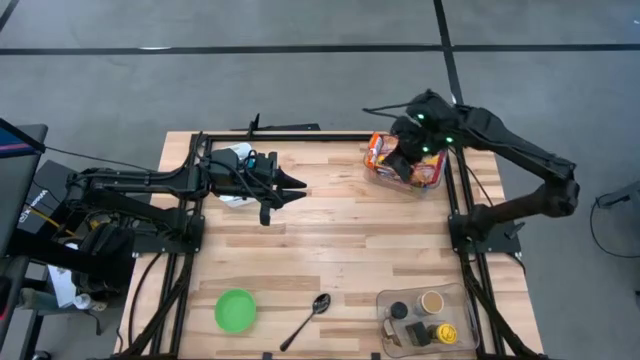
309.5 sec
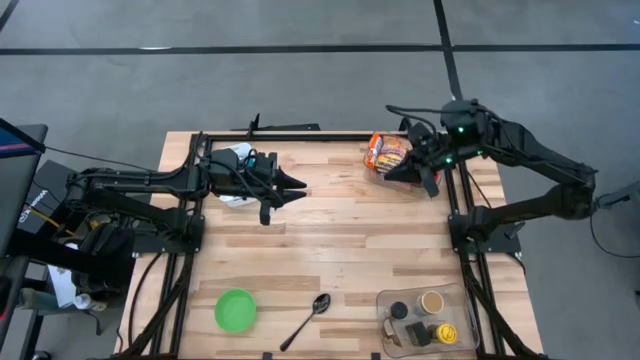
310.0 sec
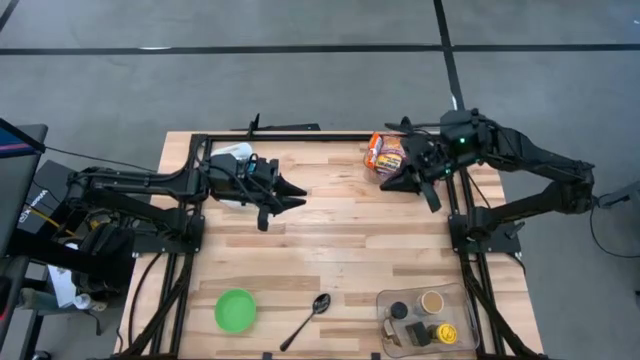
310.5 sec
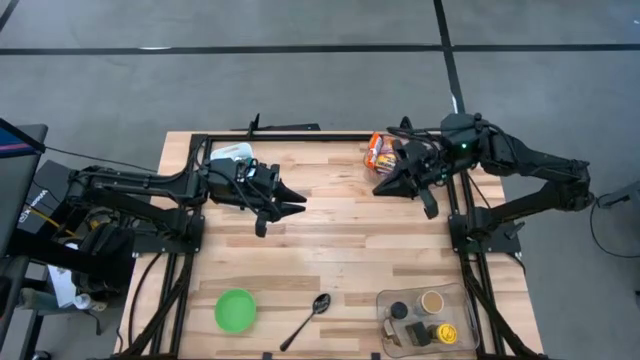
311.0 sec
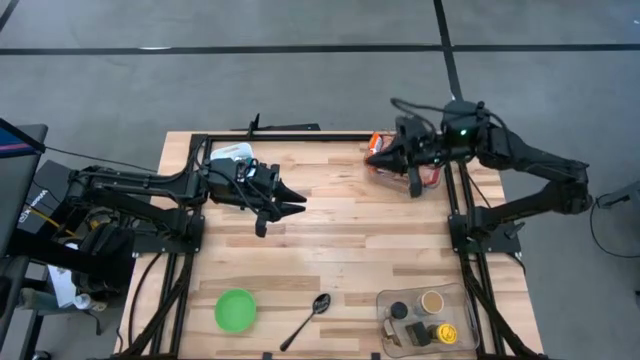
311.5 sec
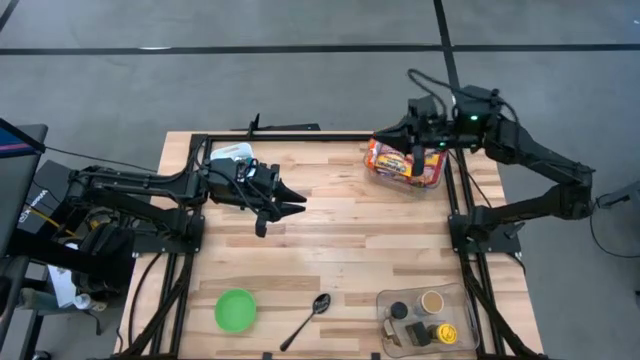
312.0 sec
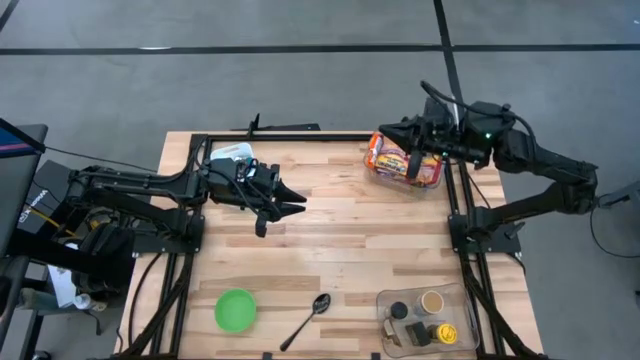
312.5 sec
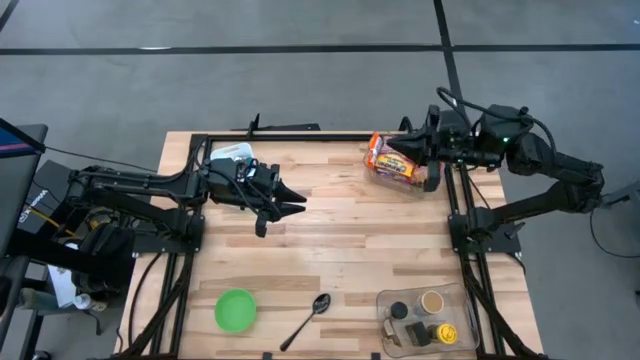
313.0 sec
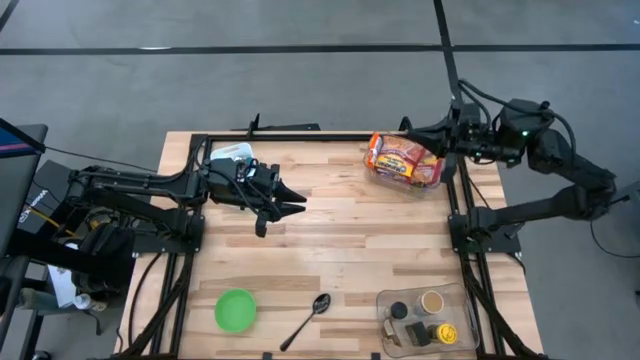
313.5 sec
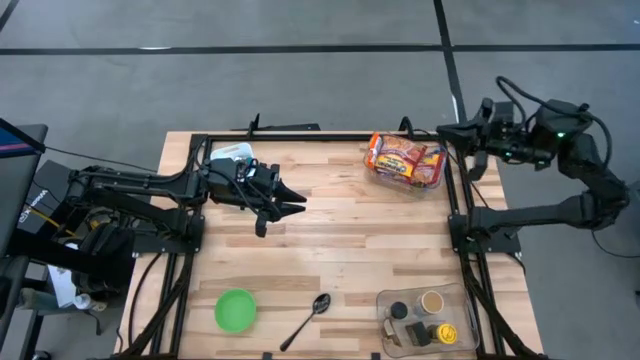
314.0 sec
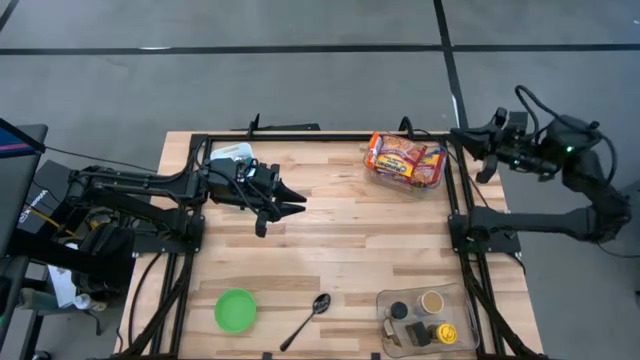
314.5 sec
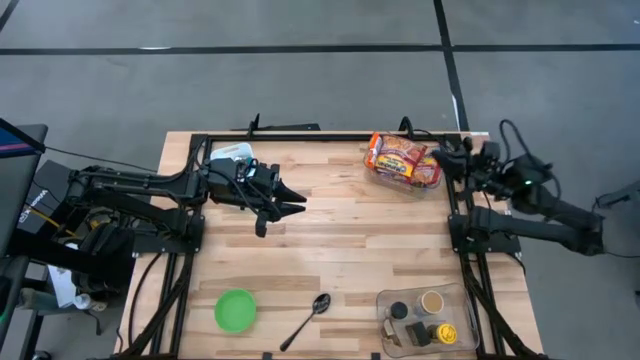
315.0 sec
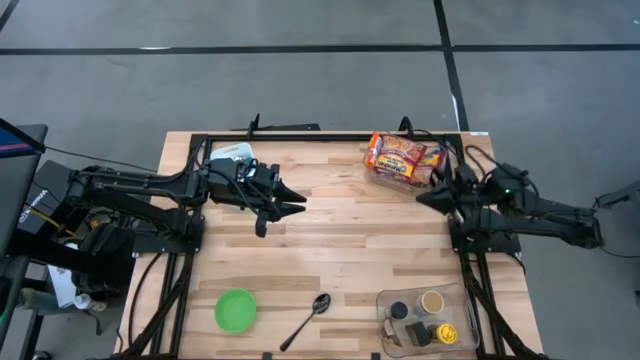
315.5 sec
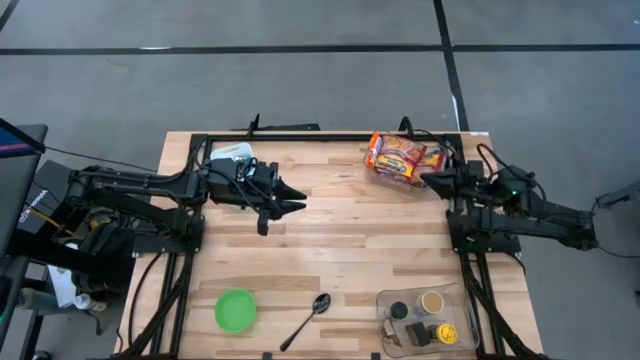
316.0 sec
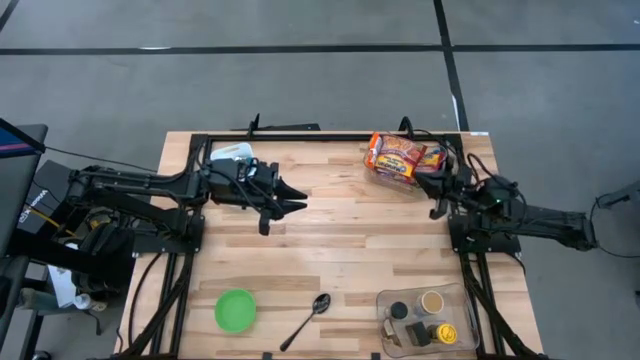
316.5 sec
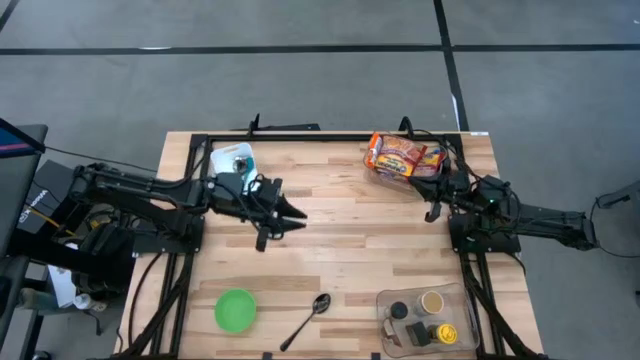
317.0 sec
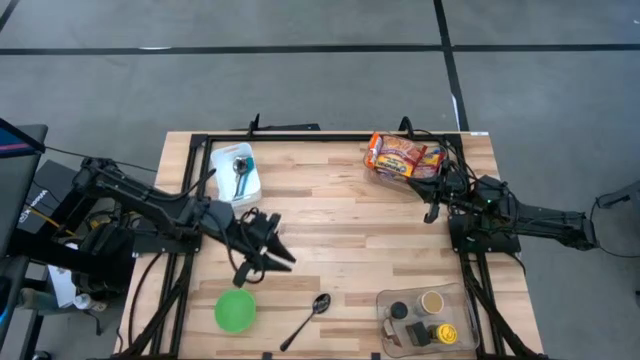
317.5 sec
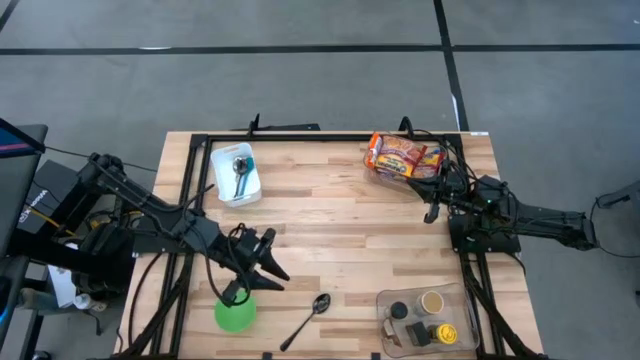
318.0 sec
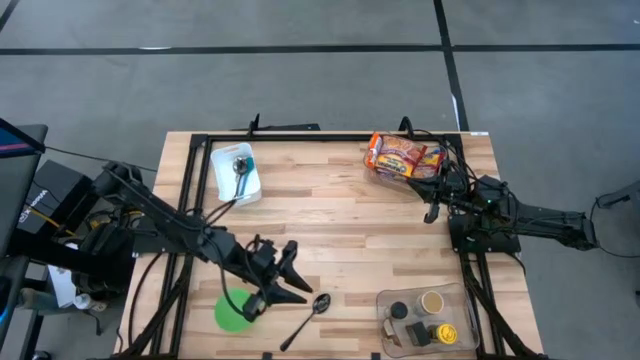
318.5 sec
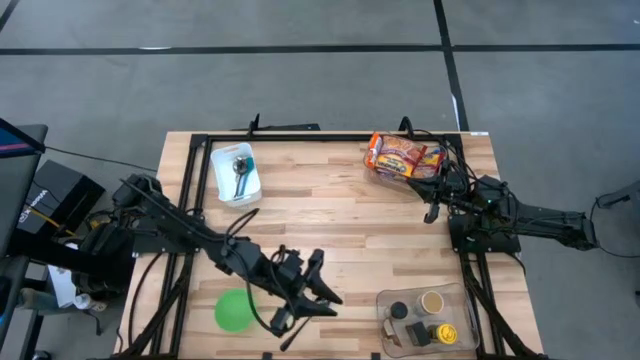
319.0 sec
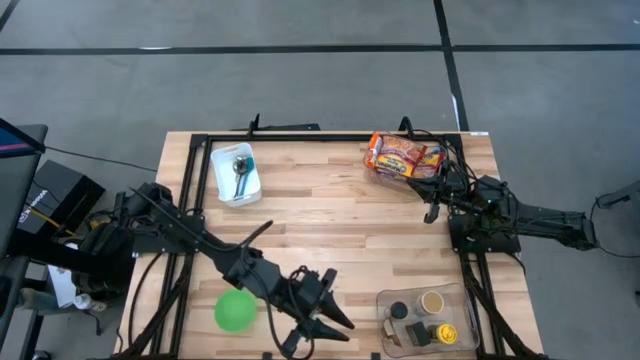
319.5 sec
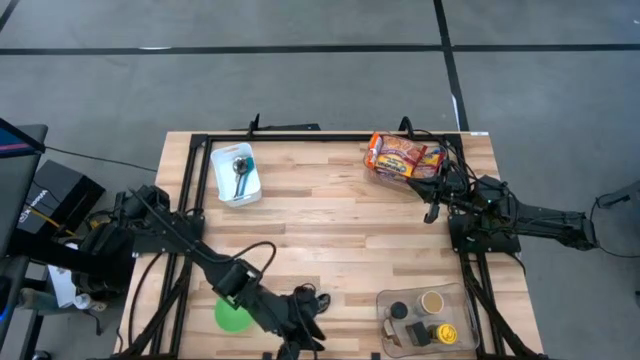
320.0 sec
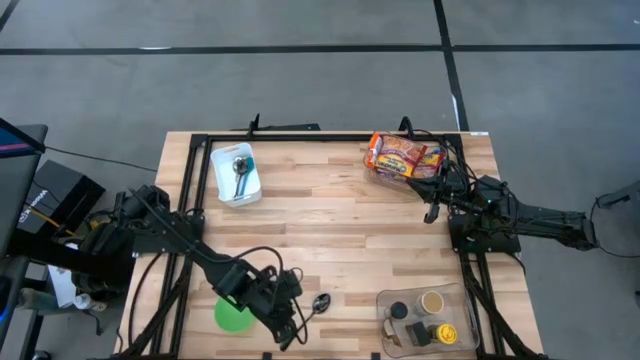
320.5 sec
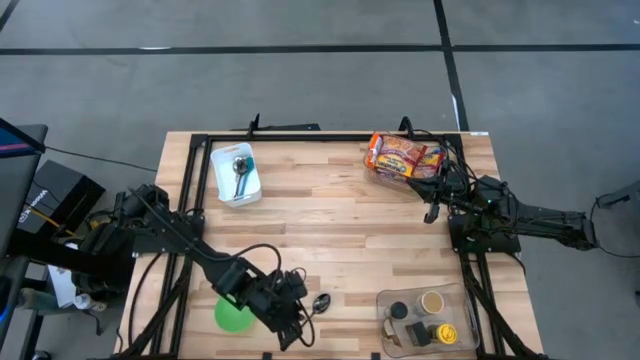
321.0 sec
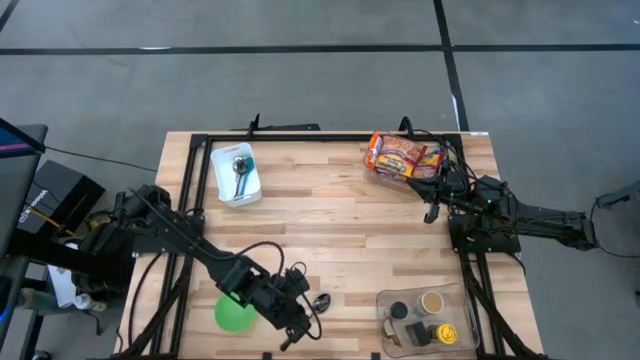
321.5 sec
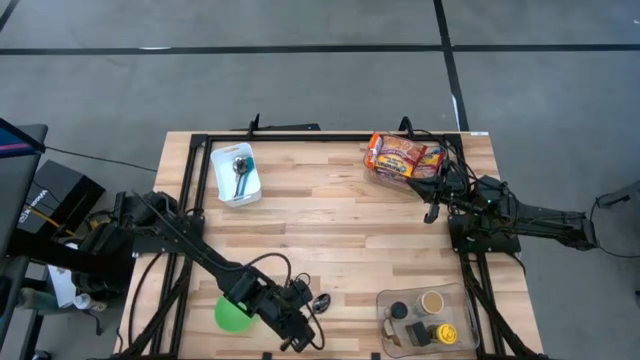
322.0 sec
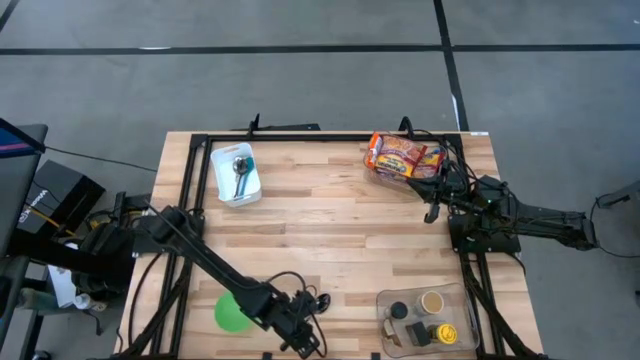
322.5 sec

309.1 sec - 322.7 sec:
Task: Pick & Place Food Item
Put the black spoon into the white bin

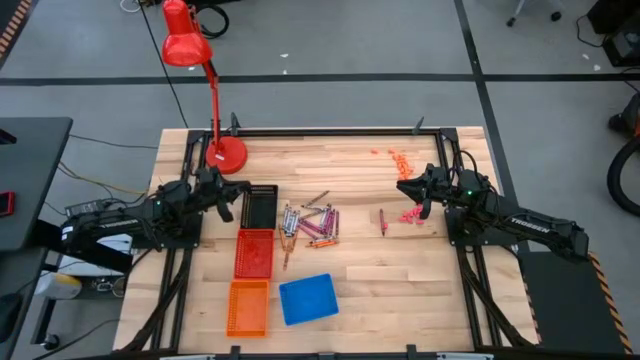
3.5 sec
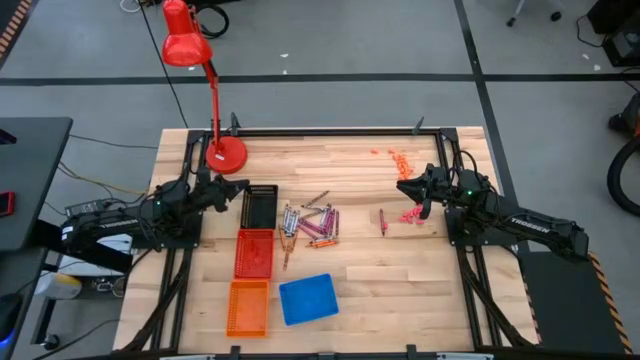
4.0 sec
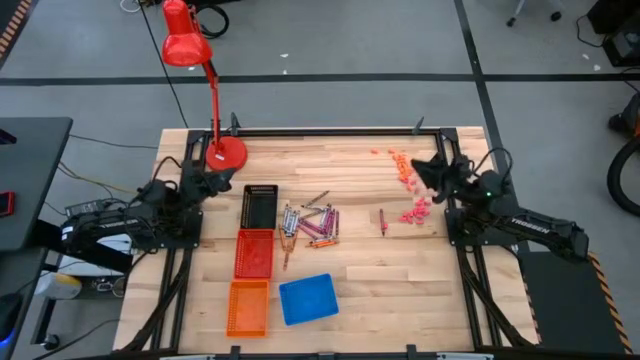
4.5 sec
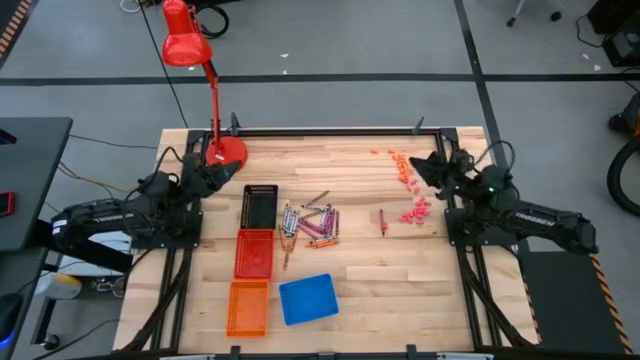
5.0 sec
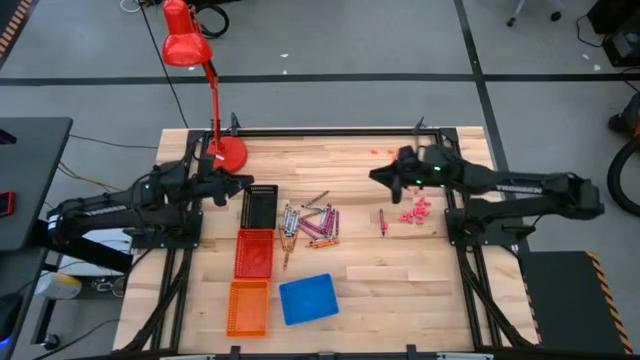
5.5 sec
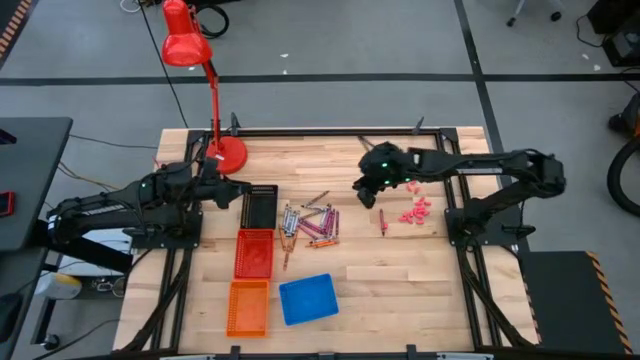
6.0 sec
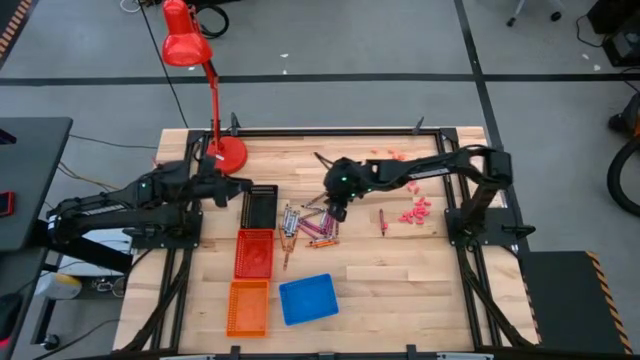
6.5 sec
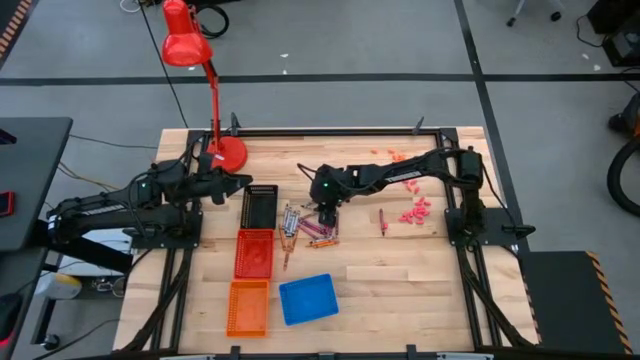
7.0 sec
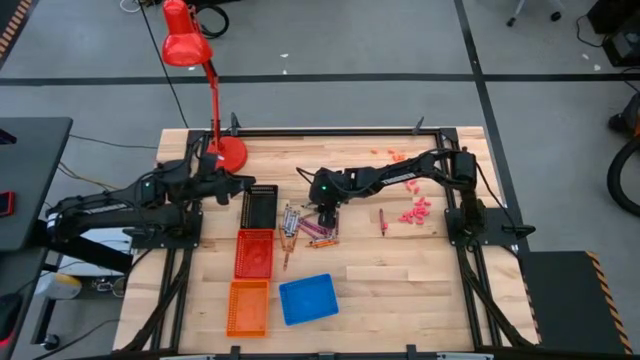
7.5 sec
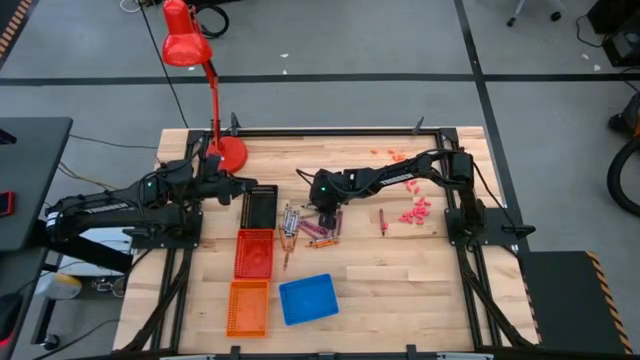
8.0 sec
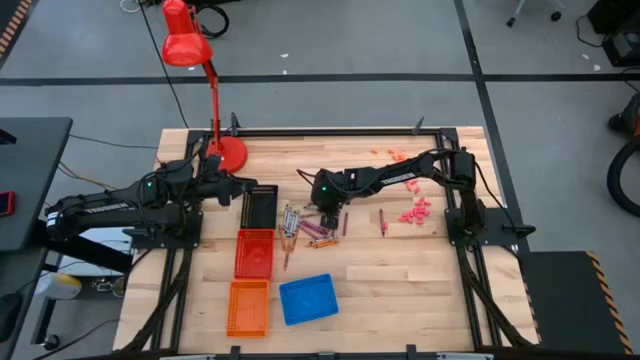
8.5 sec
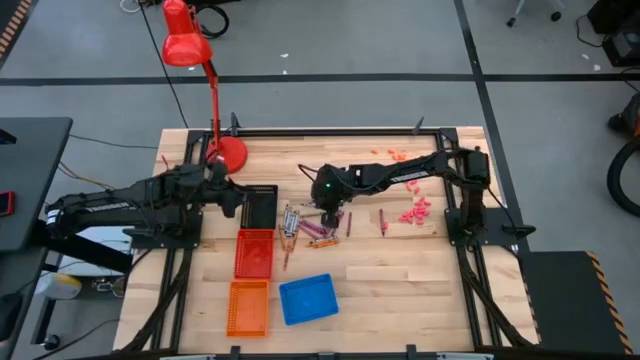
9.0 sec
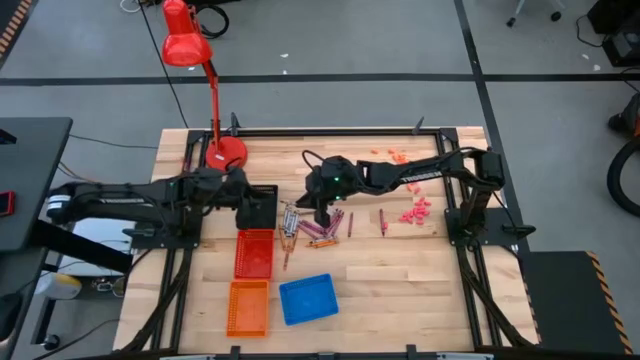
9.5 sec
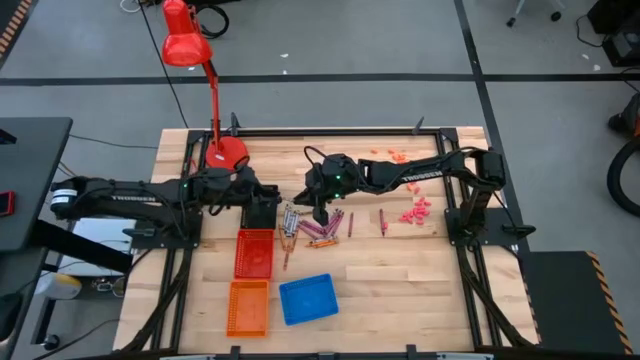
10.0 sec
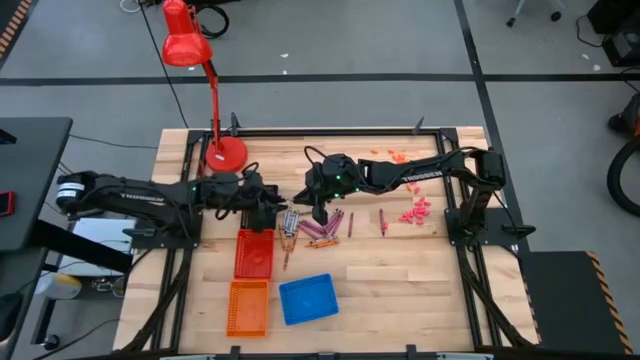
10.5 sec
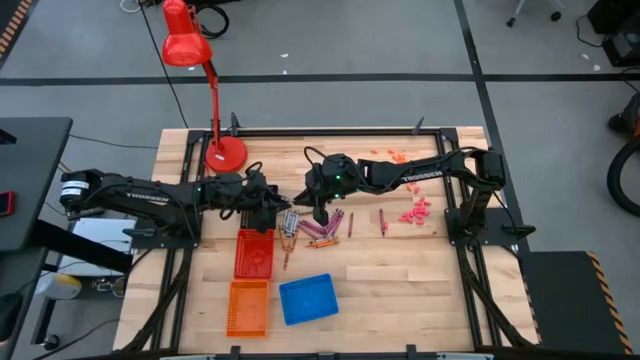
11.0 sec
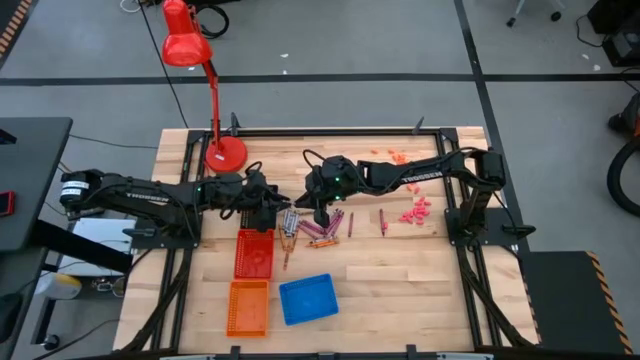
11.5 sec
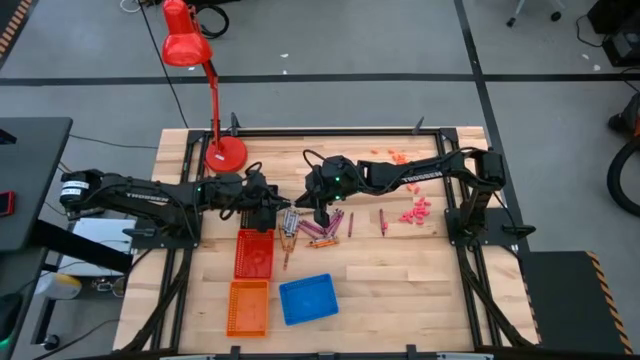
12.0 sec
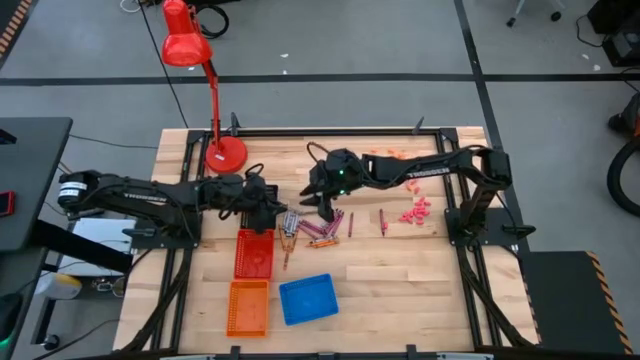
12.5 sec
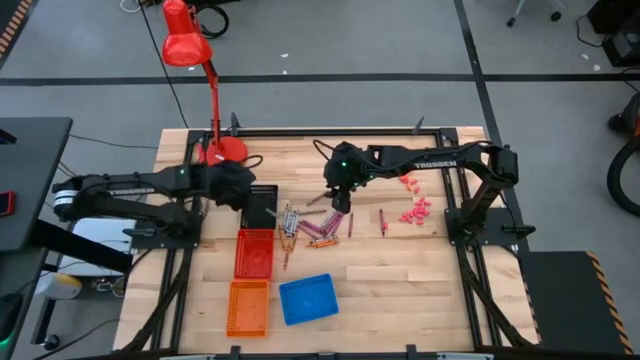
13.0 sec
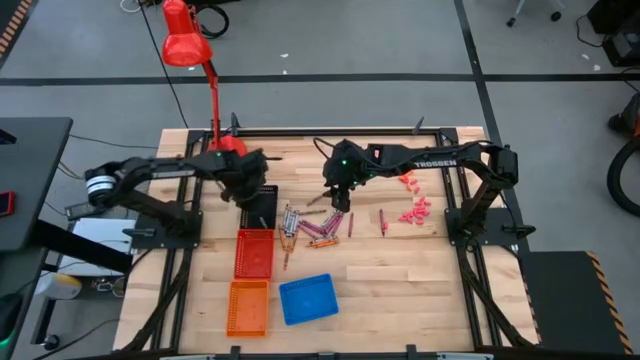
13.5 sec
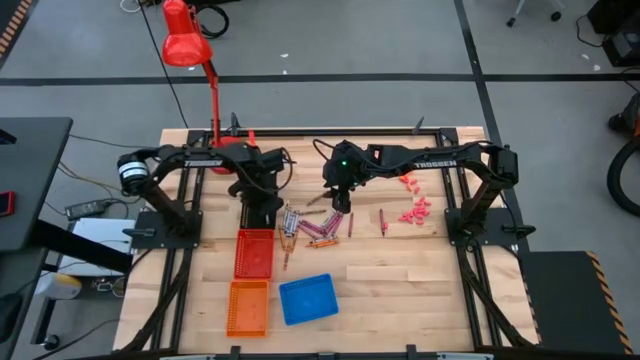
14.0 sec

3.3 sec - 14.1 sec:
Task: Sort crayons
Put the black crayon into the black bin
